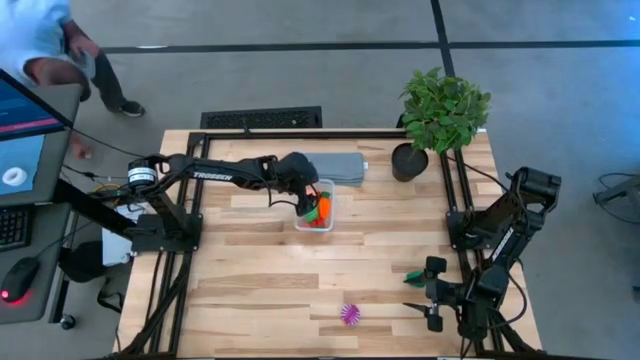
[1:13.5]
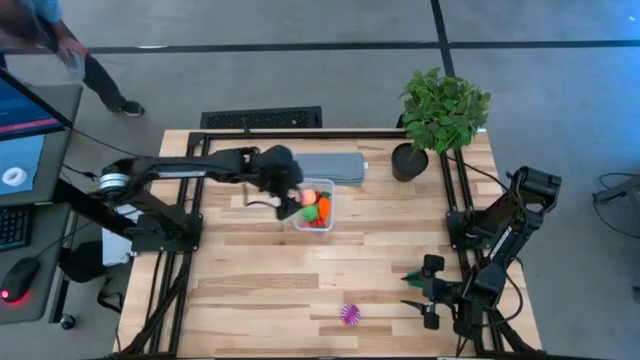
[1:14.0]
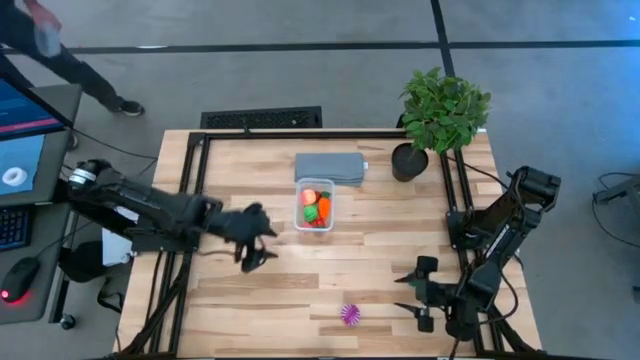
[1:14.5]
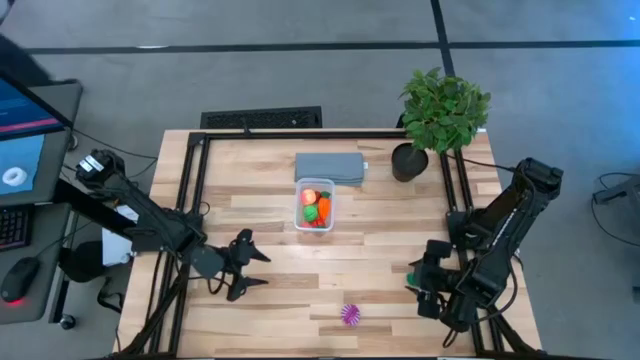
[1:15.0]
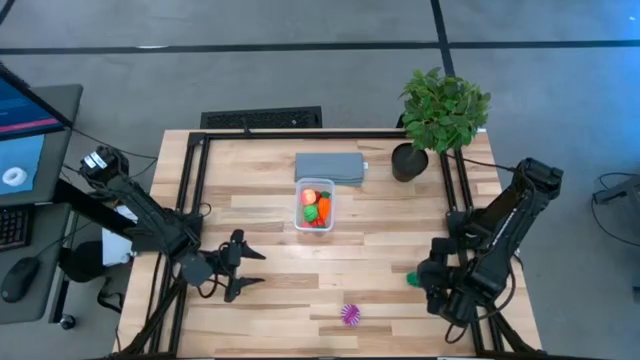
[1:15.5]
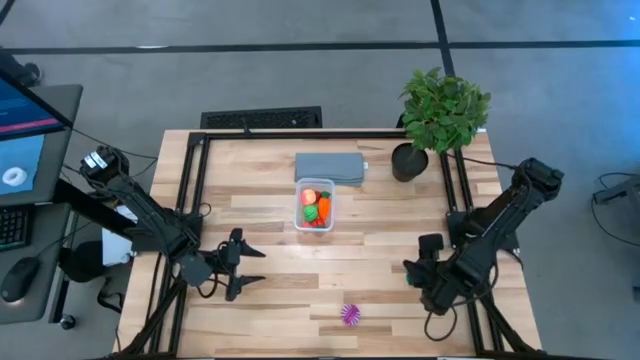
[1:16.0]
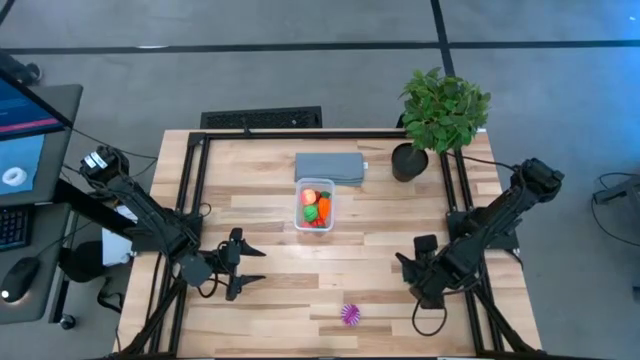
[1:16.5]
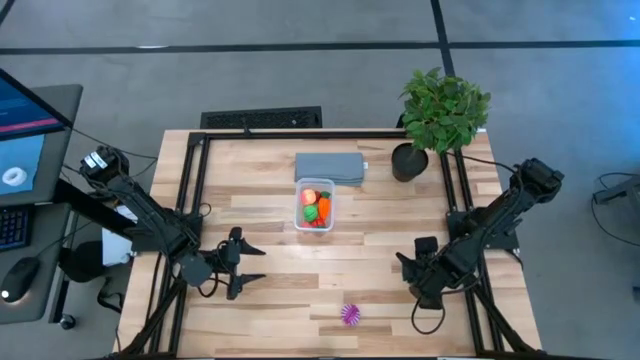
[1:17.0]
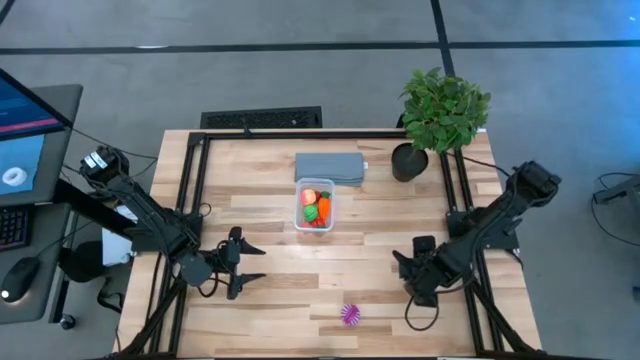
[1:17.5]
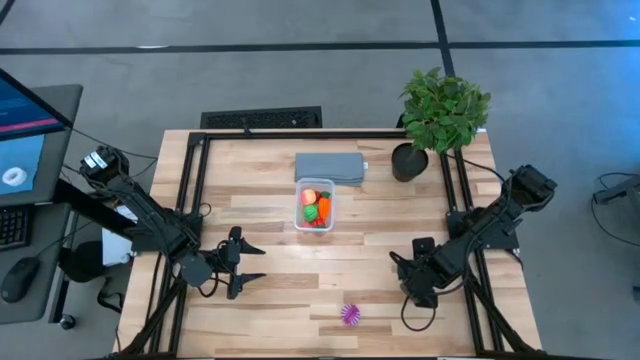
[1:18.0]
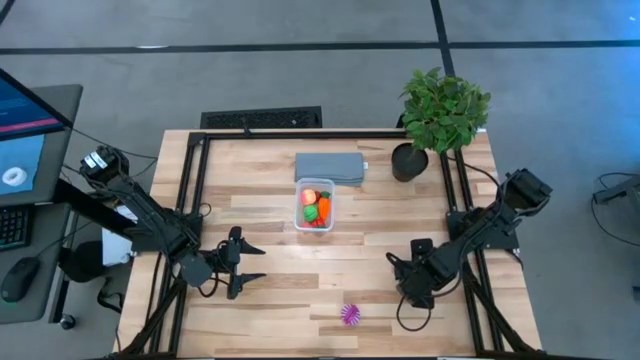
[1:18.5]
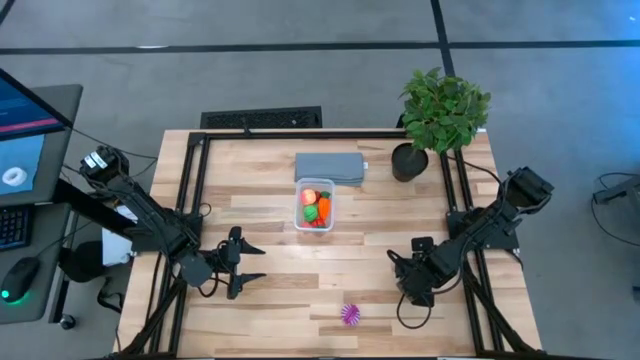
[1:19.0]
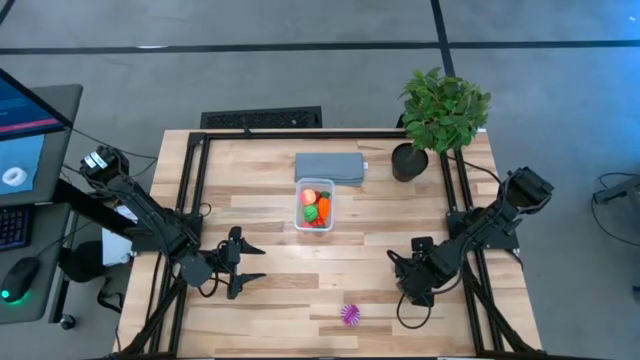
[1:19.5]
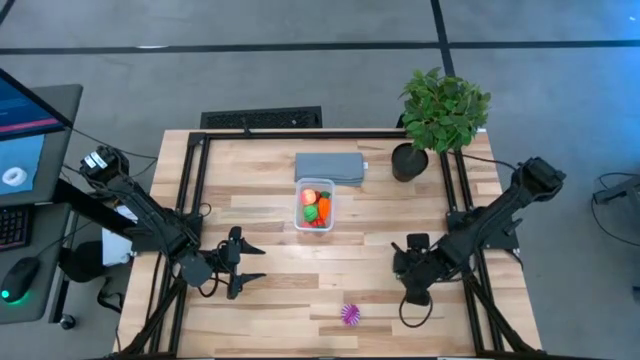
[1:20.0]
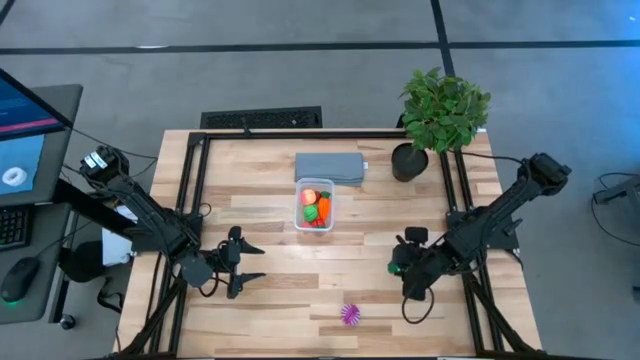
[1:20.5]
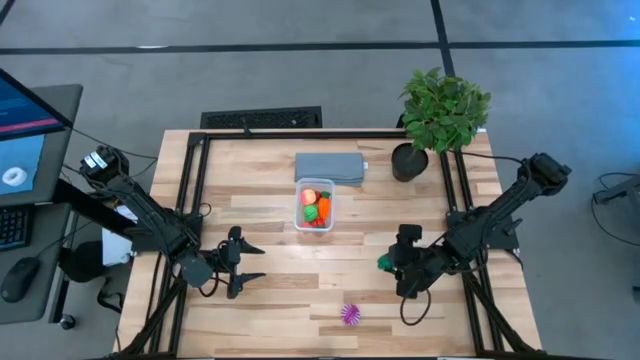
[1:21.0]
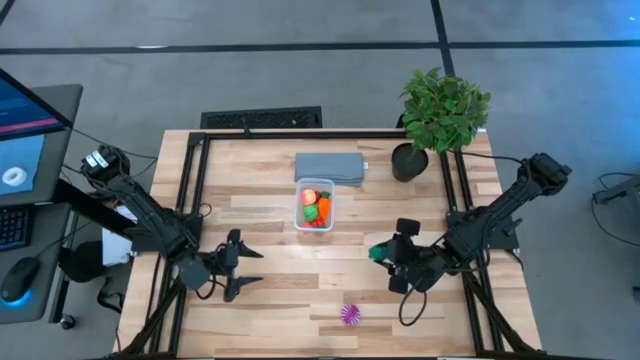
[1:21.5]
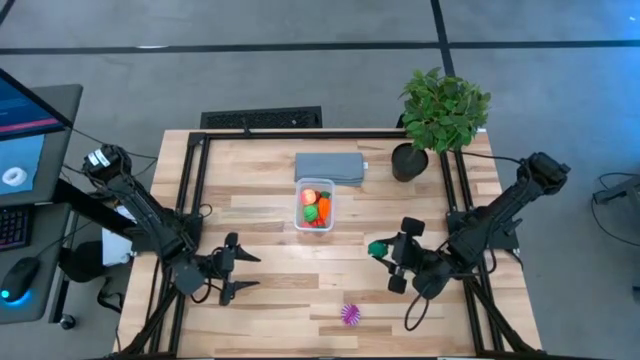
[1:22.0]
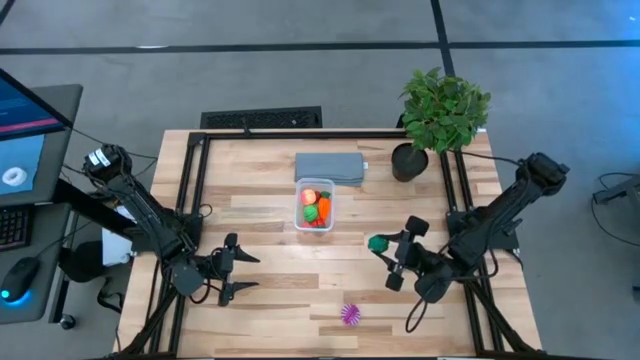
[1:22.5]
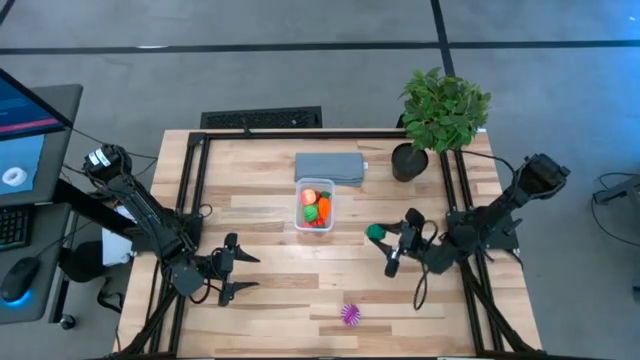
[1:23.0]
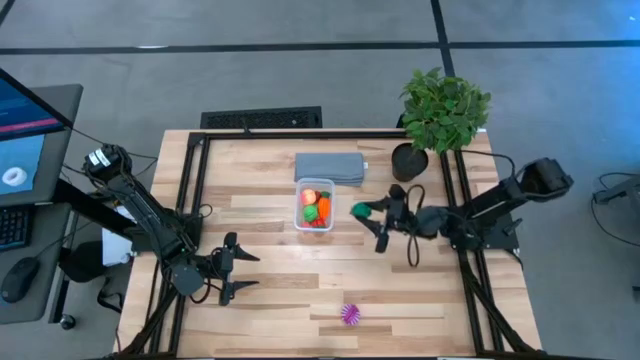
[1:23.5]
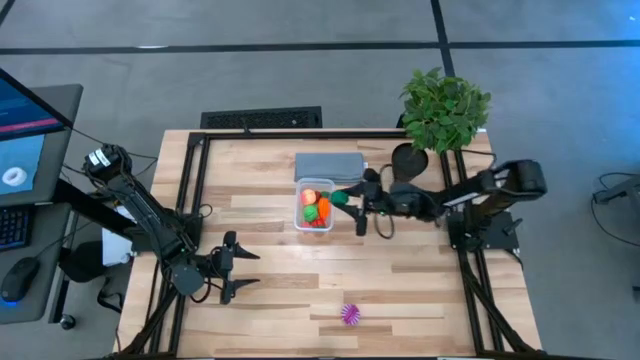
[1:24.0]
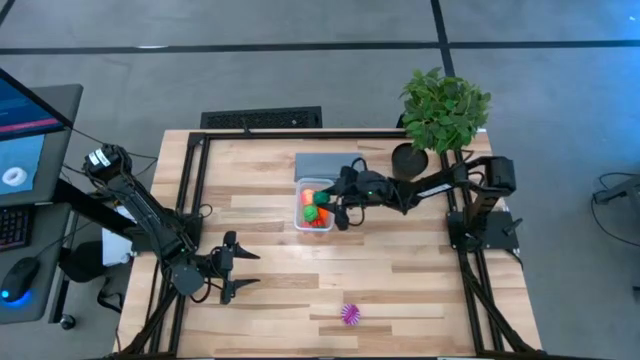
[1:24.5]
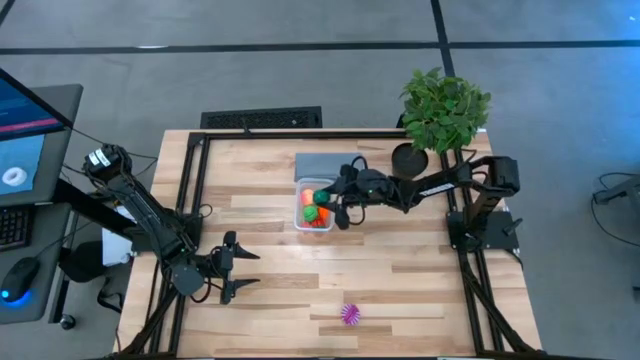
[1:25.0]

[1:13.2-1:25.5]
Task: Pick and placing Produce into tupperware
Put the green bell pepper into the transparent bin

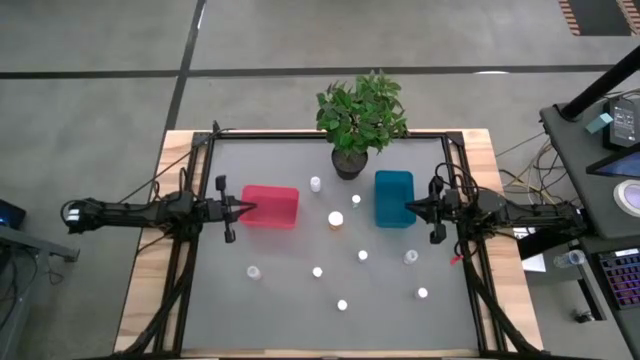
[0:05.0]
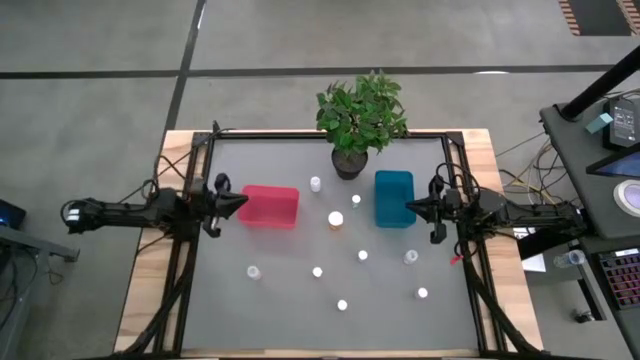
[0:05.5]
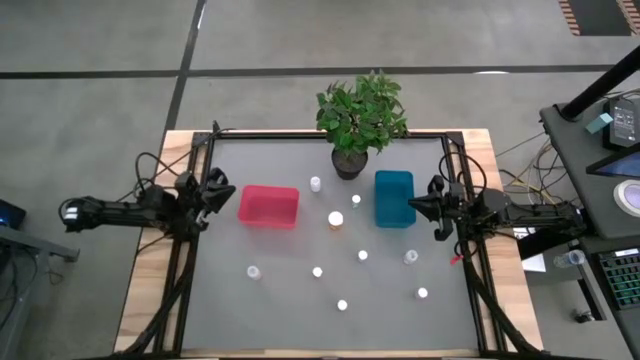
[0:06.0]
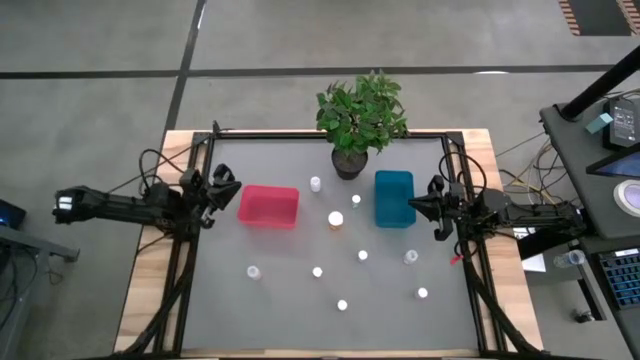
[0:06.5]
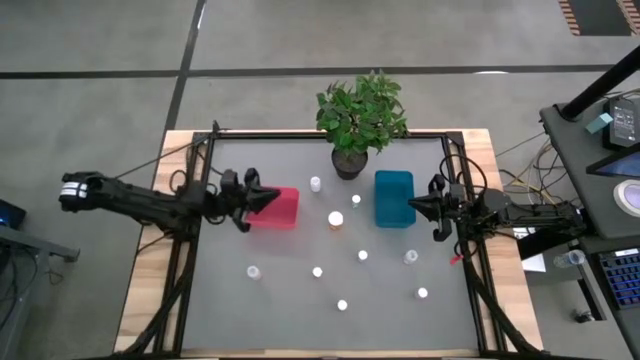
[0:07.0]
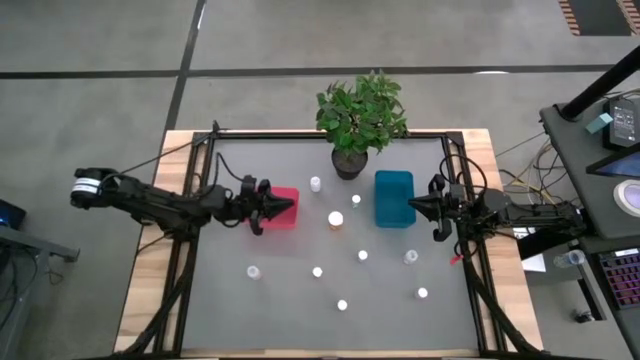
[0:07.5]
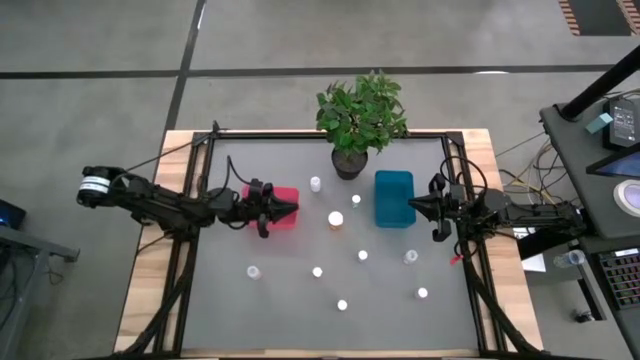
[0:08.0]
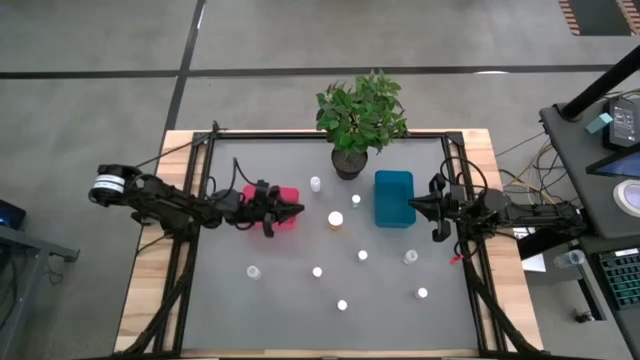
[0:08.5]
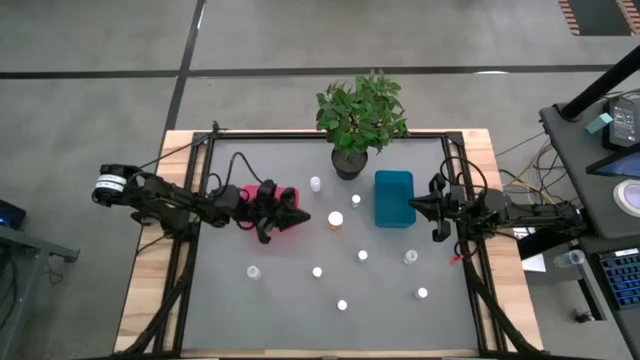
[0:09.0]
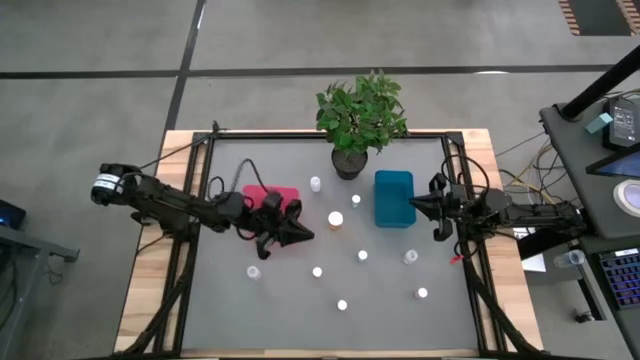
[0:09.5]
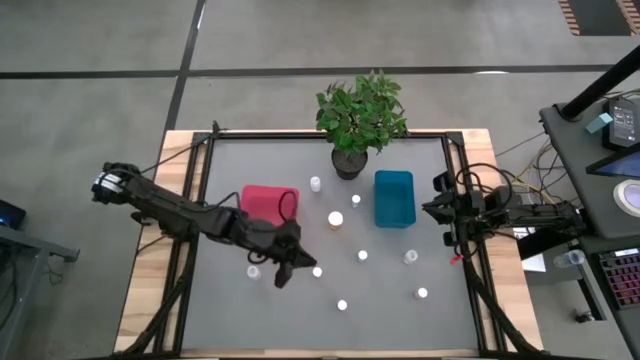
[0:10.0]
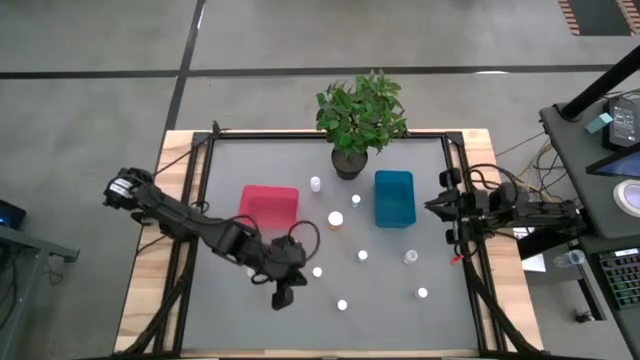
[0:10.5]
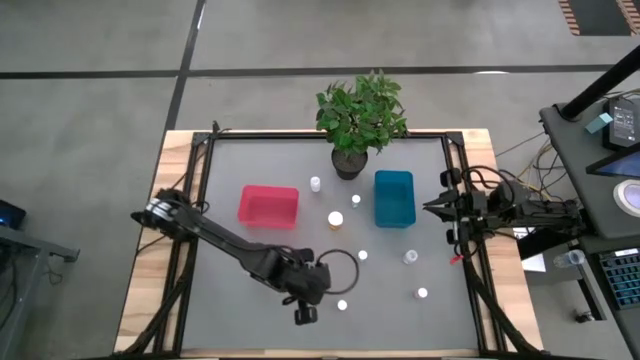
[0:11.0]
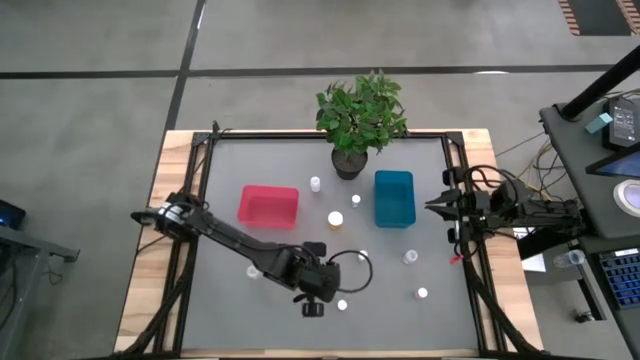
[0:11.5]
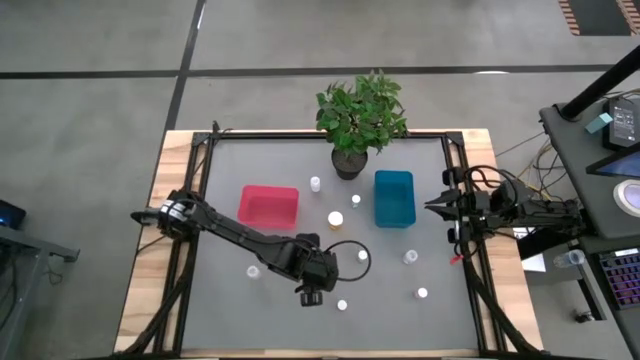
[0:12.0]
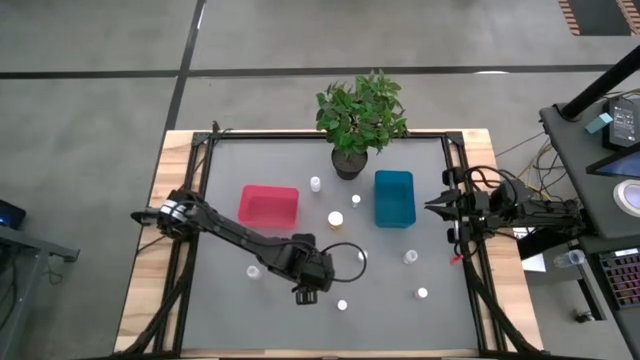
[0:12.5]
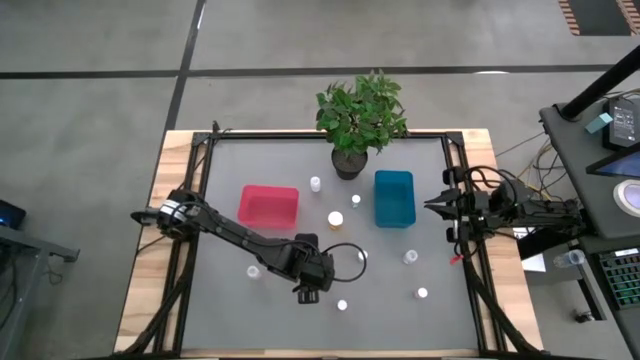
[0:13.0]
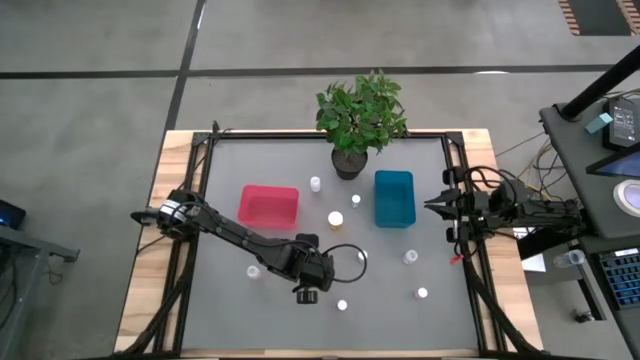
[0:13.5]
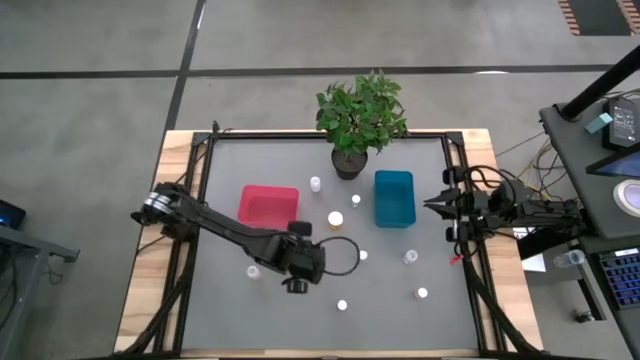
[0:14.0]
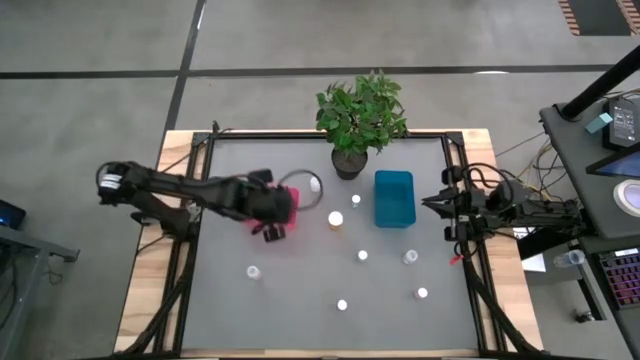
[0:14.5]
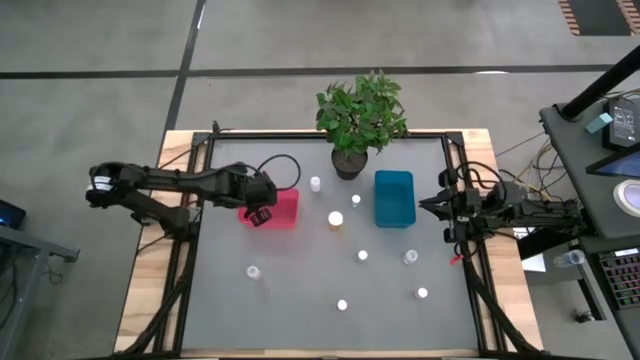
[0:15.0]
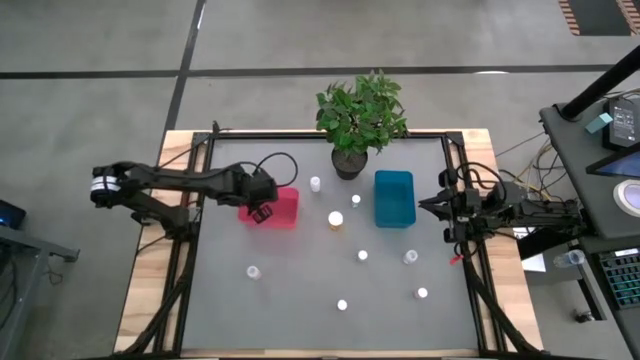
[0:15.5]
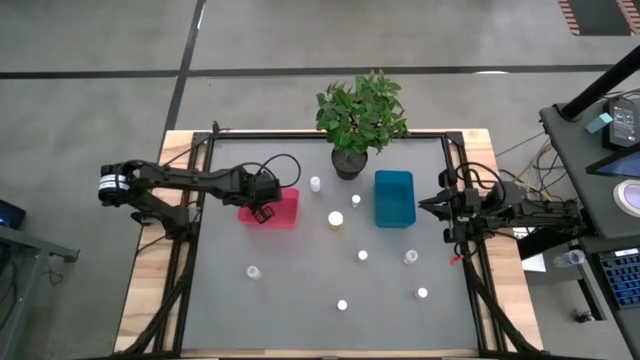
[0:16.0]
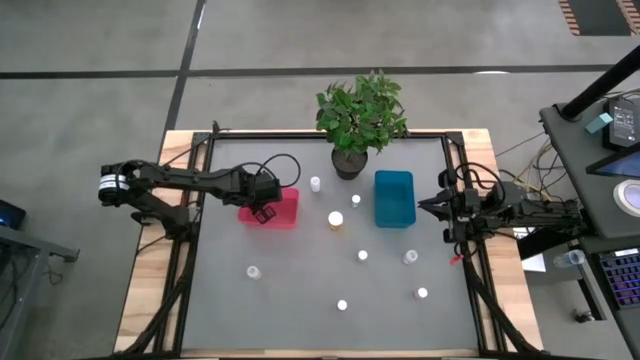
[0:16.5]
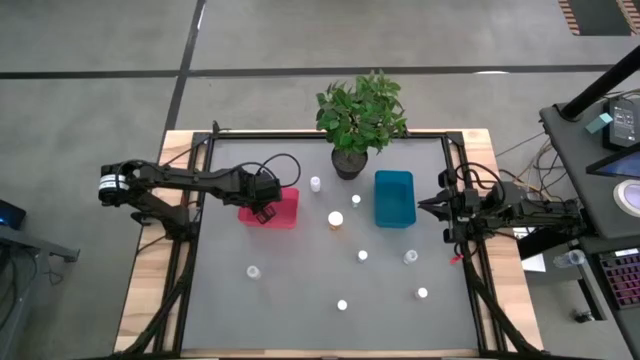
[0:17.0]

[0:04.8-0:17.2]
Task: Pick and place medicine bottles into bin by pill shape (circle, oval)
Put the small pink pill bottle into the pink bin
